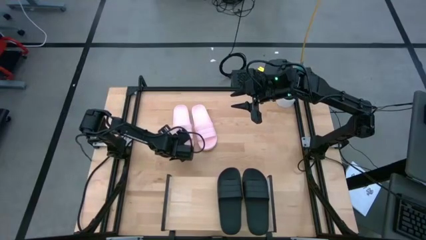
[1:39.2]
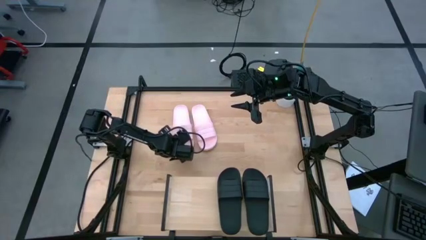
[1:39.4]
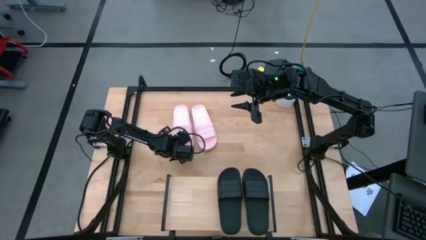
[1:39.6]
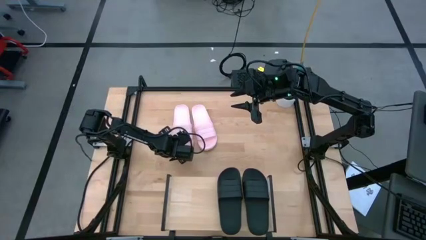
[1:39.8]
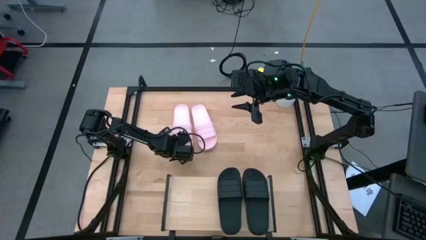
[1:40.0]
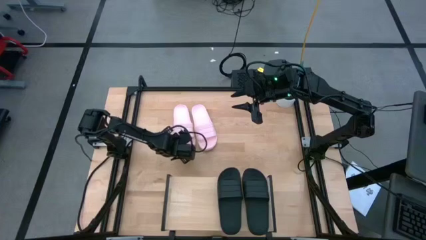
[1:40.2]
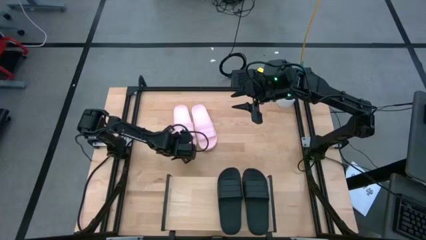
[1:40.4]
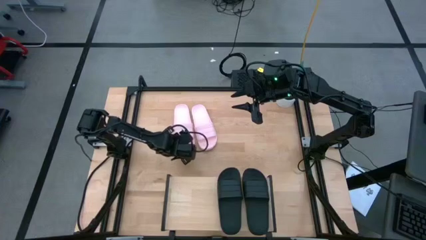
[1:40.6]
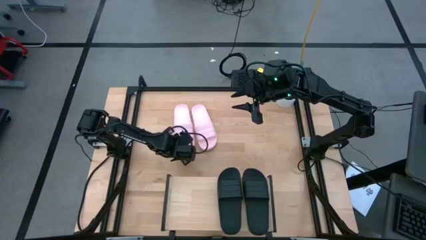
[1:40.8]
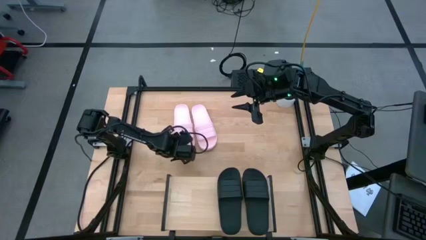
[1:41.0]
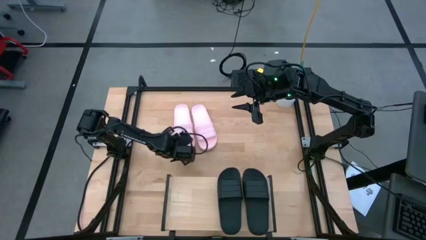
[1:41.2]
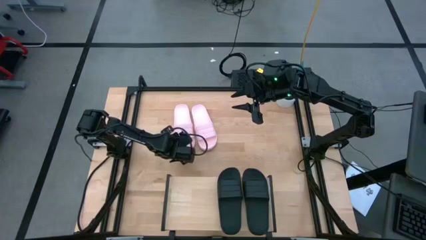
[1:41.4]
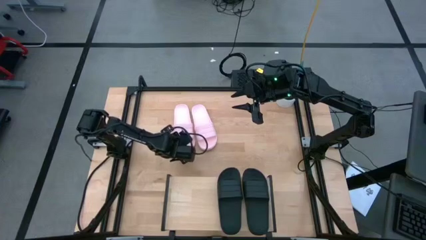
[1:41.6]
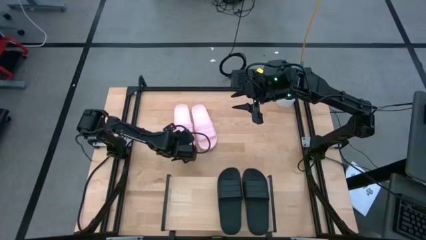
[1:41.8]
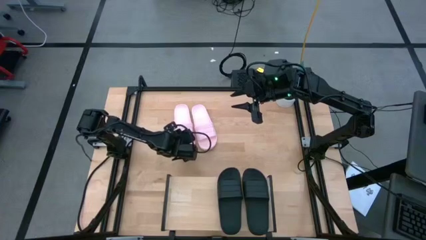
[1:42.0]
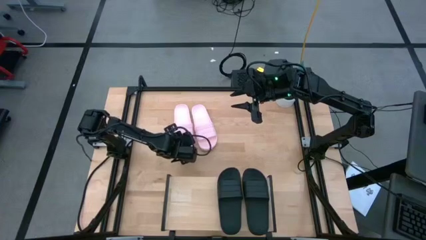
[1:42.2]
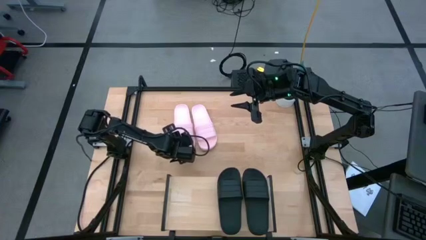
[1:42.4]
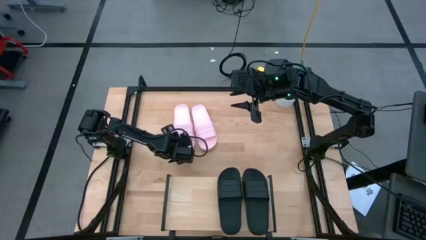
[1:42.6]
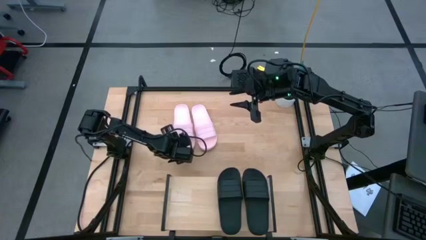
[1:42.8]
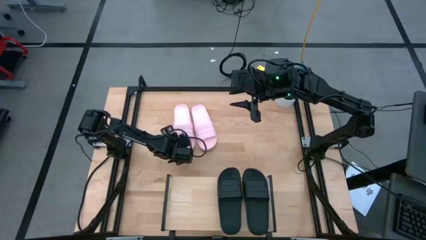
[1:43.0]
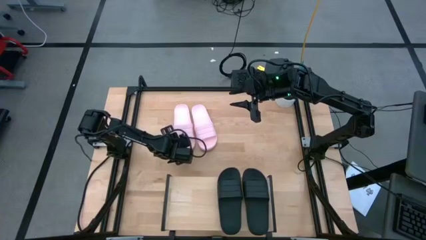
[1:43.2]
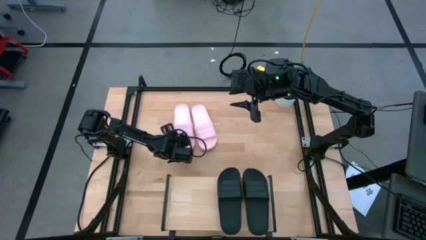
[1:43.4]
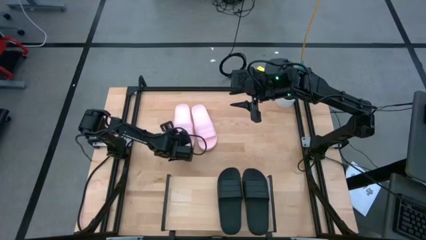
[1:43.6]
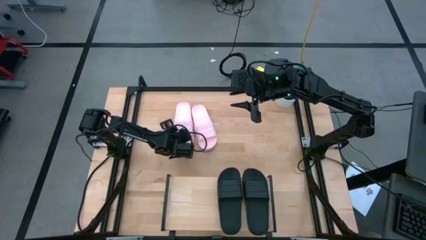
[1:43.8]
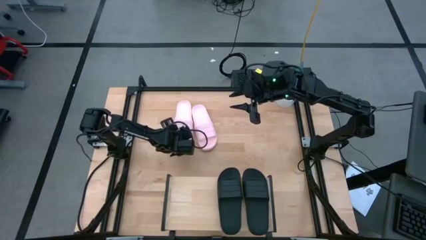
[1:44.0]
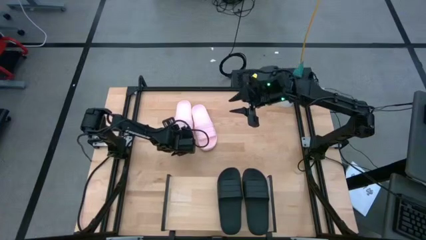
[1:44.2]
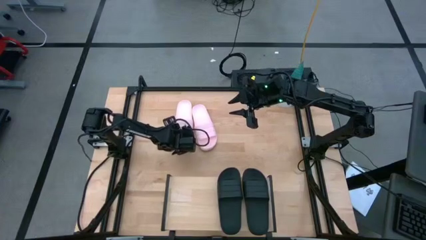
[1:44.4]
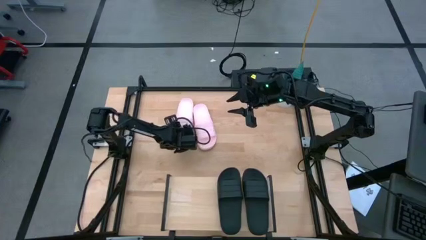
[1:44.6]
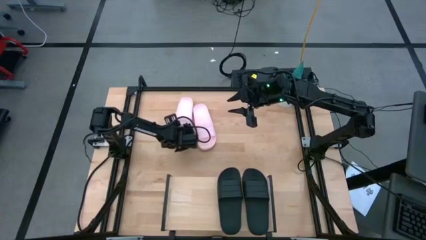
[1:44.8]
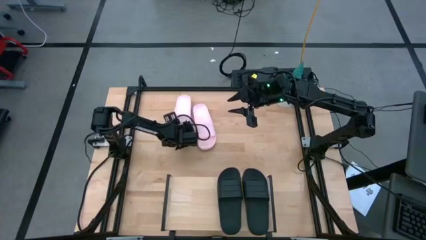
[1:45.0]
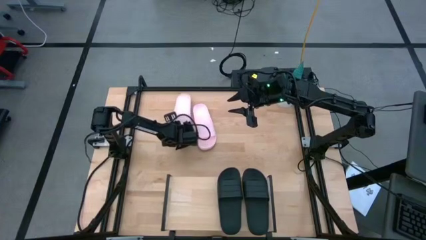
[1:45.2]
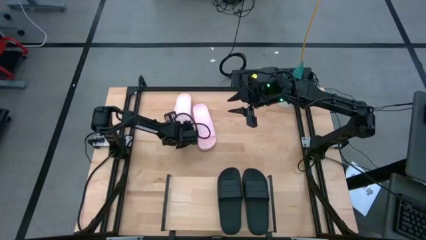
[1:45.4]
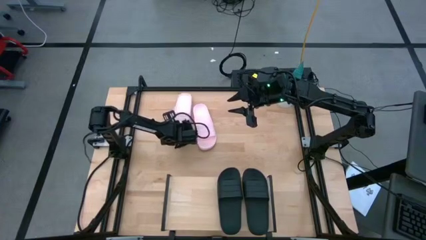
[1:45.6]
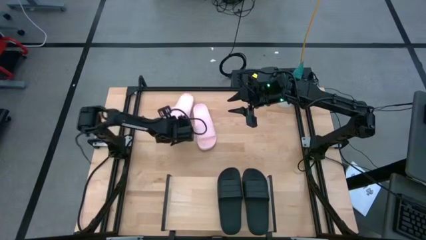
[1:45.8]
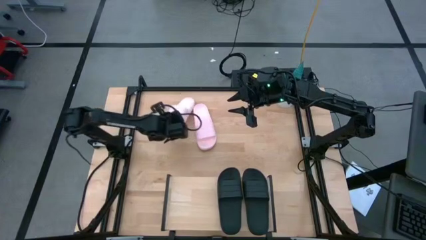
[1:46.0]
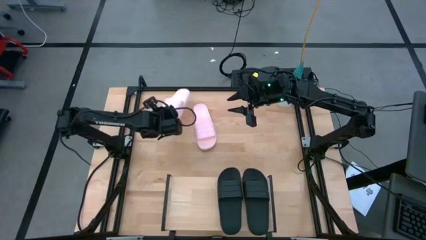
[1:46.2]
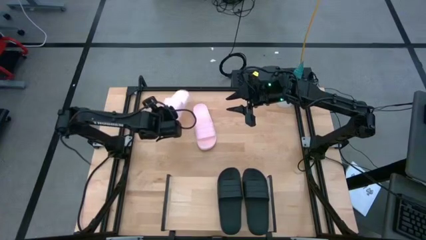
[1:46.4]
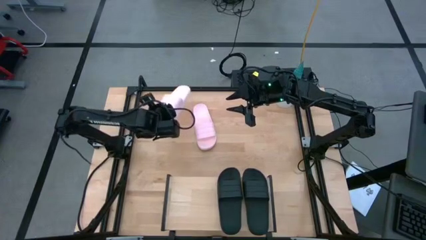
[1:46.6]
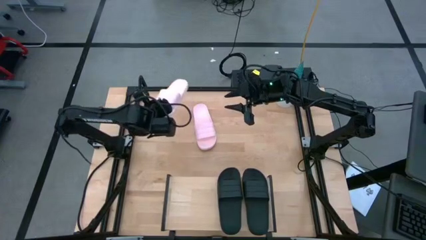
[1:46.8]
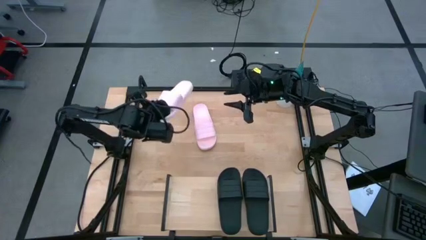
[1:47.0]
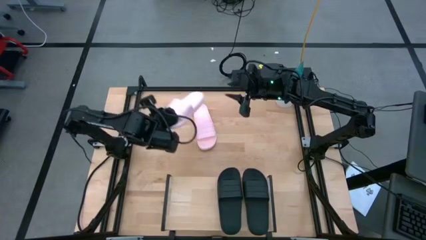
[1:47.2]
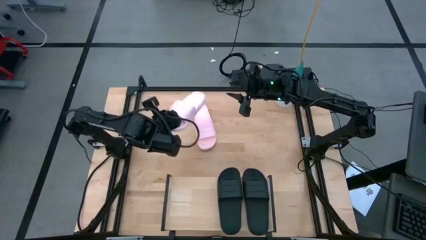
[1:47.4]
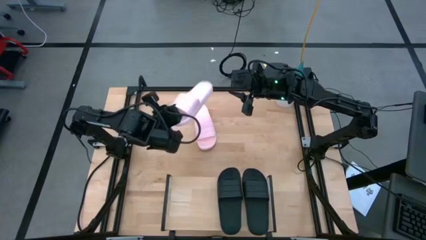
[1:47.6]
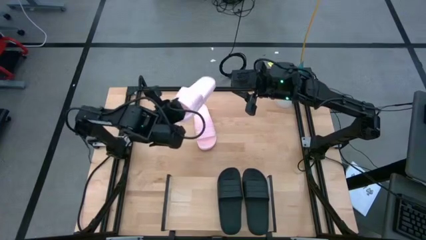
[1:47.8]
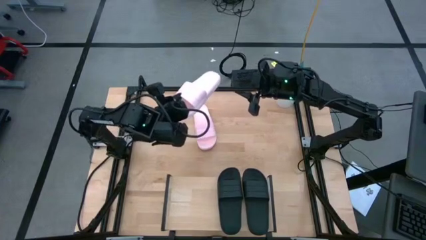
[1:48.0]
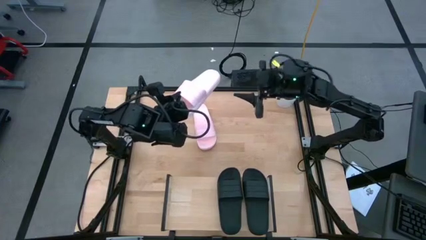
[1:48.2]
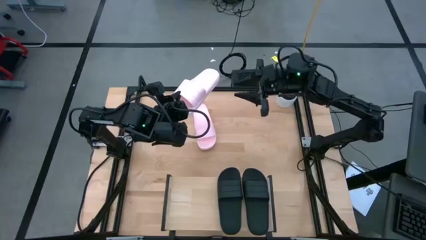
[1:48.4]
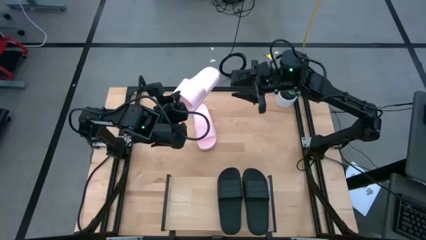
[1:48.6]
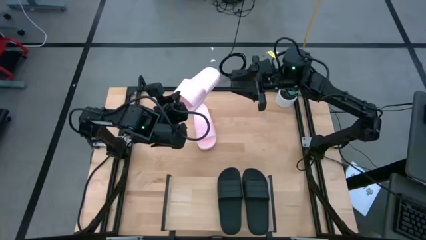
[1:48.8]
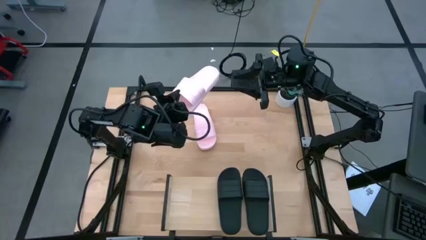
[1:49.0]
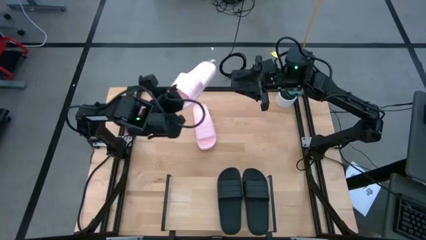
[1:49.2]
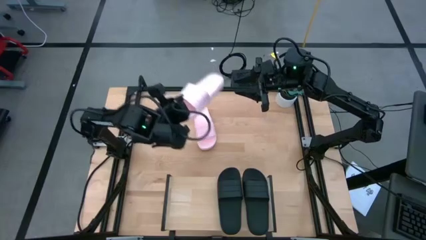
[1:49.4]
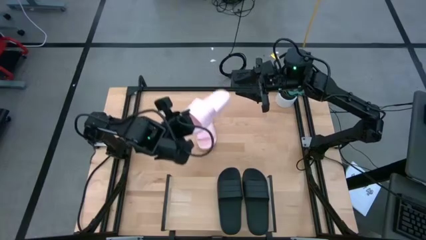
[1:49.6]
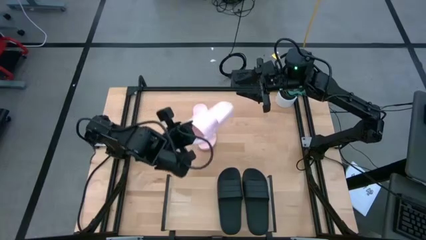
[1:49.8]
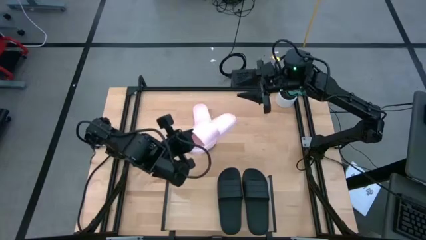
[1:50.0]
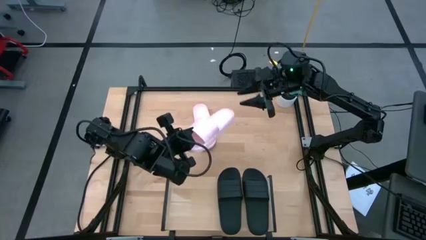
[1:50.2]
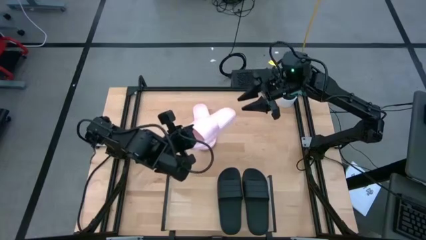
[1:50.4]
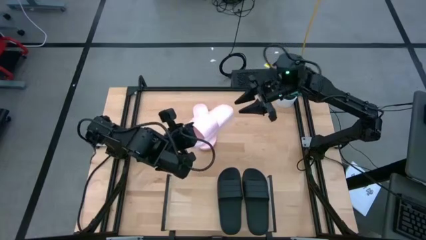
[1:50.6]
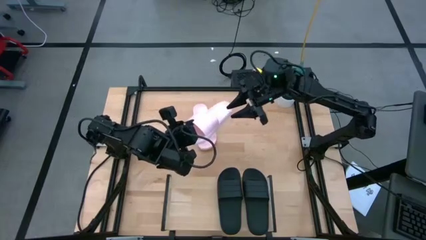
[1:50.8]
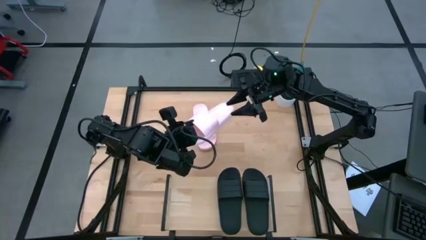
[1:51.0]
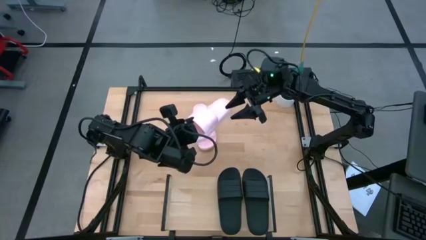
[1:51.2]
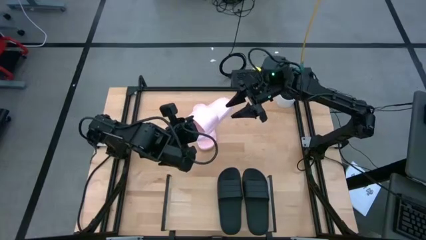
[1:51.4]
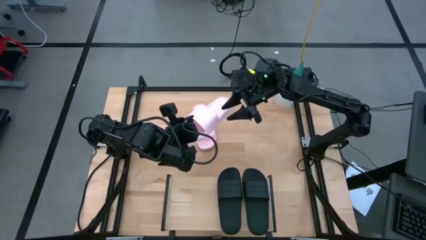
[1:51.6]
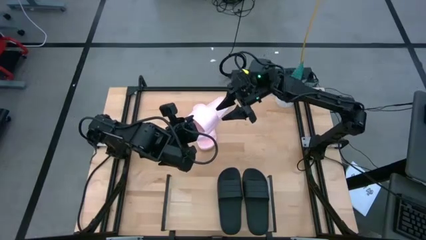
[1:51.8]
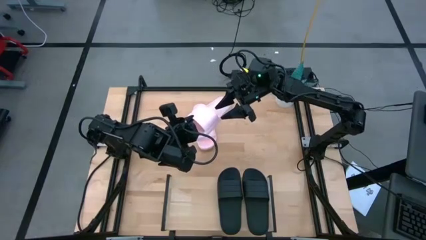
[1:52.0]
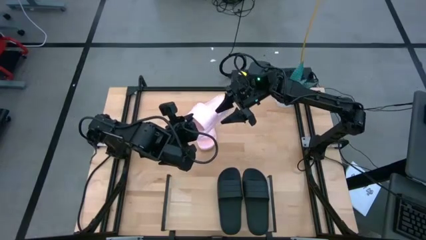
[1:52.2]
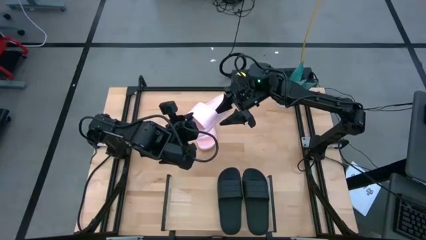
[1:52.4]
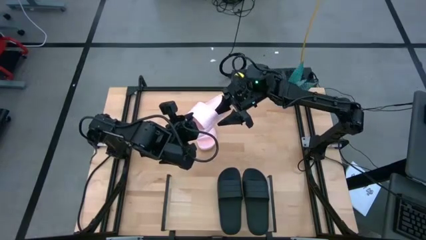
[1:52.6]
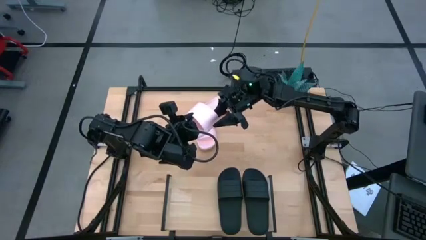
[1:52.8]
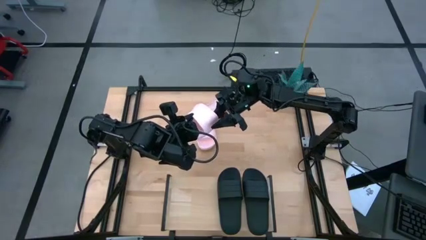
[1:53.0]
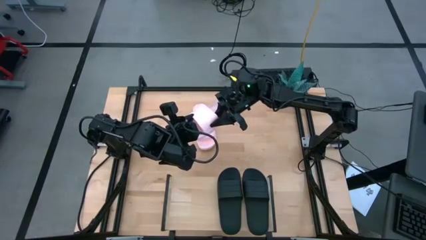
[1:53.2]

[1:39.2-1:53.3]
Task: Pick and place slides into the shelf
Put the left pink slipper on the shelf
